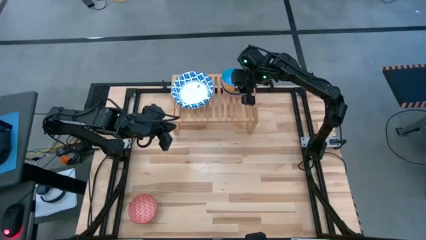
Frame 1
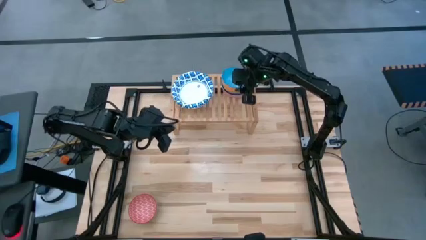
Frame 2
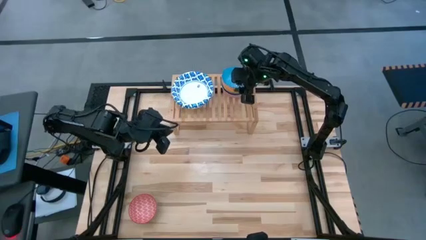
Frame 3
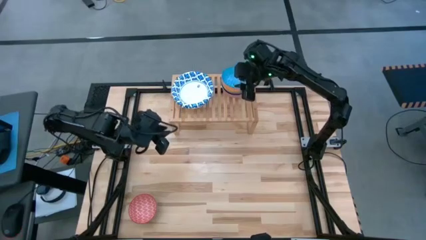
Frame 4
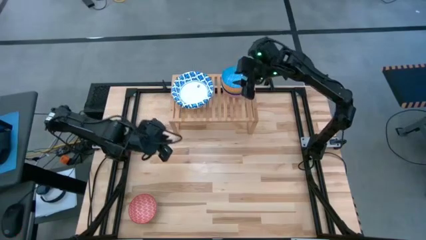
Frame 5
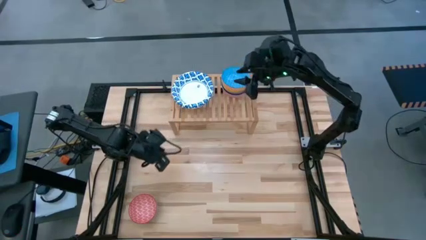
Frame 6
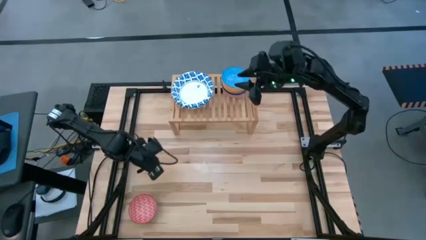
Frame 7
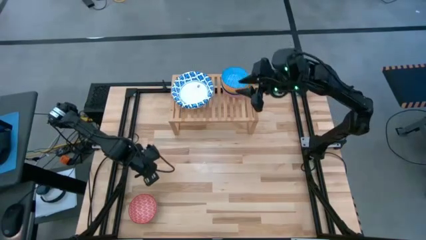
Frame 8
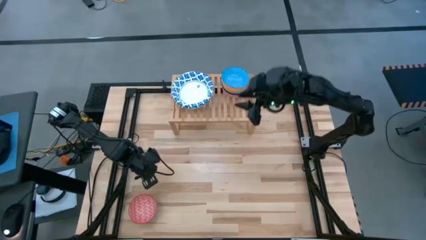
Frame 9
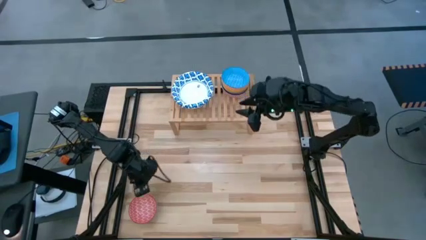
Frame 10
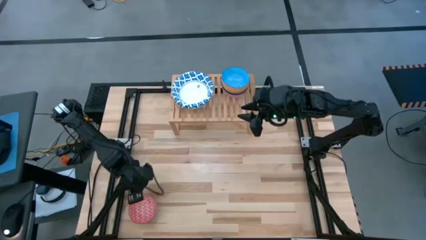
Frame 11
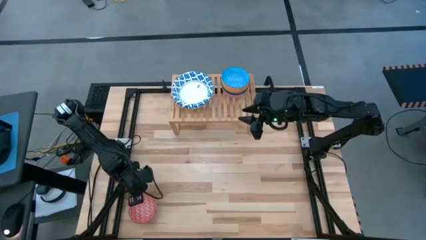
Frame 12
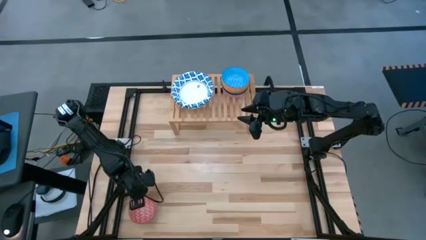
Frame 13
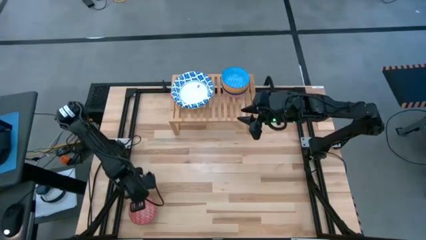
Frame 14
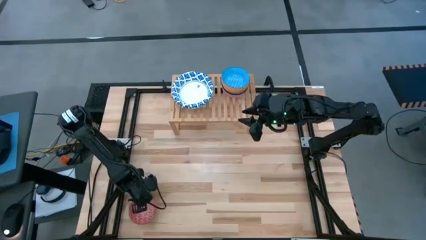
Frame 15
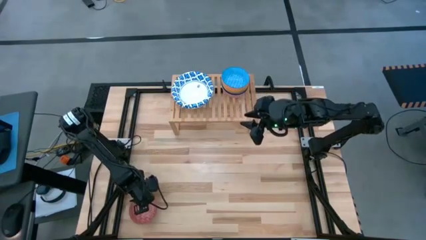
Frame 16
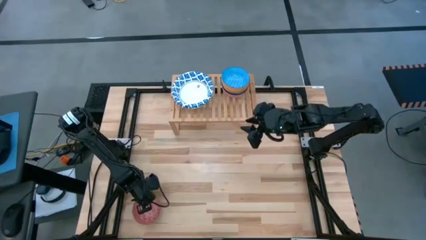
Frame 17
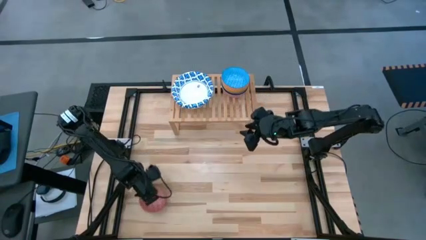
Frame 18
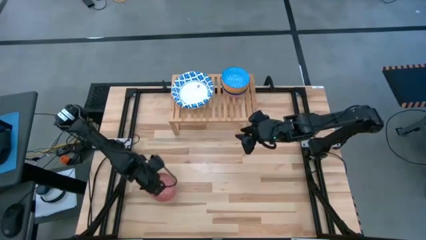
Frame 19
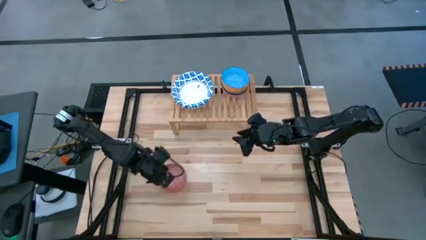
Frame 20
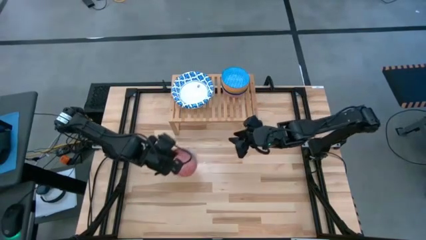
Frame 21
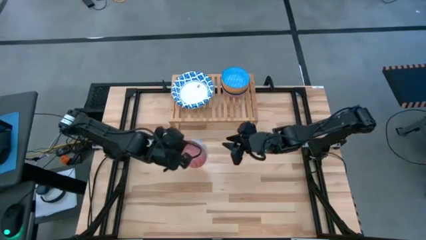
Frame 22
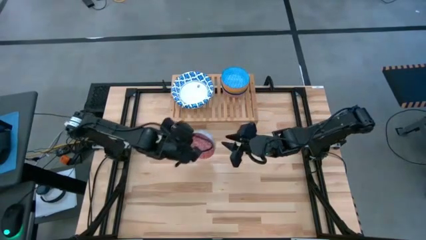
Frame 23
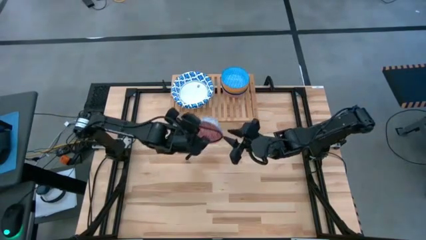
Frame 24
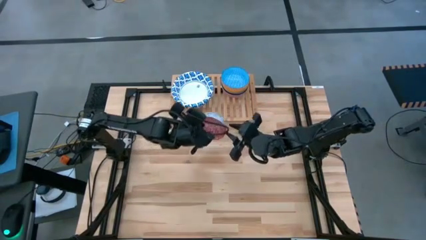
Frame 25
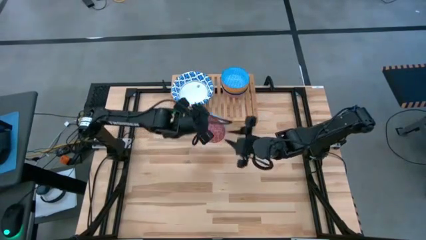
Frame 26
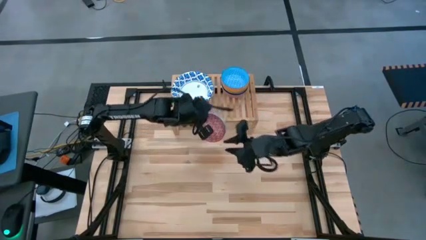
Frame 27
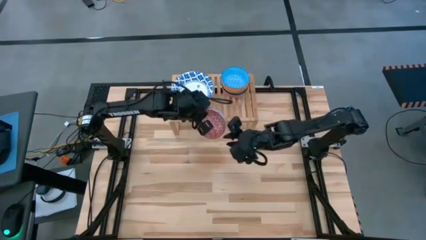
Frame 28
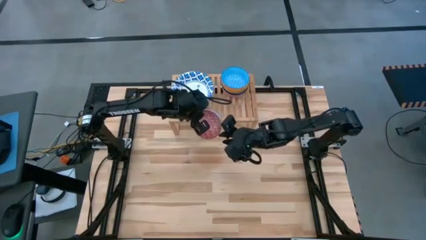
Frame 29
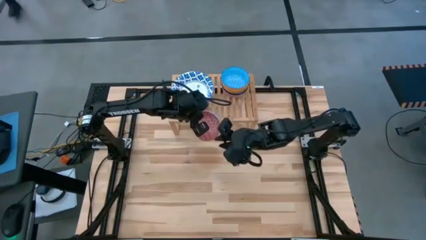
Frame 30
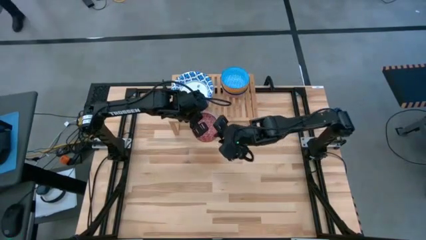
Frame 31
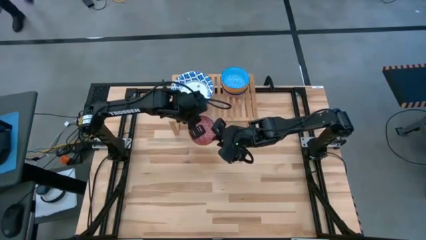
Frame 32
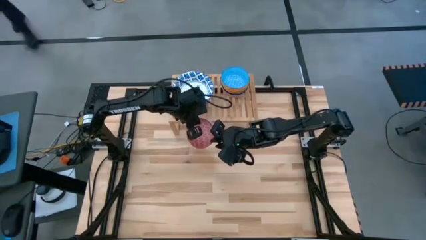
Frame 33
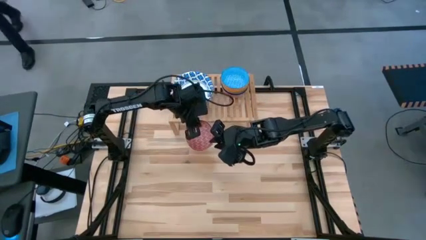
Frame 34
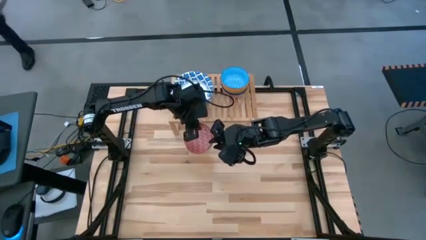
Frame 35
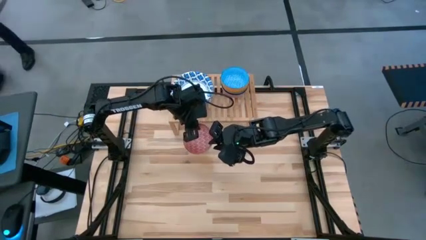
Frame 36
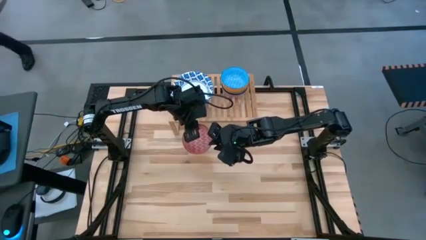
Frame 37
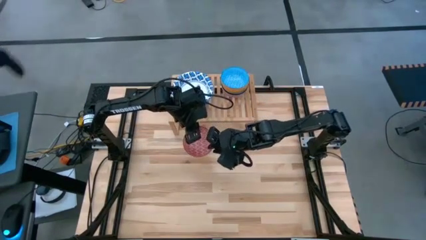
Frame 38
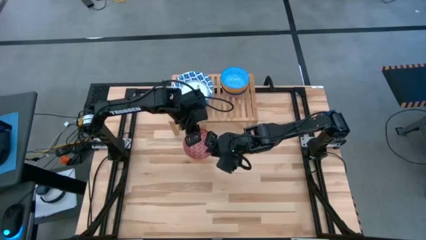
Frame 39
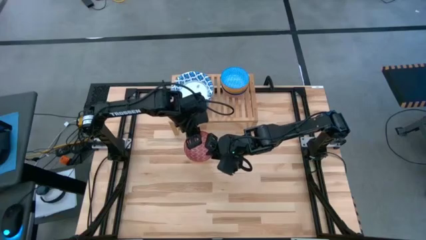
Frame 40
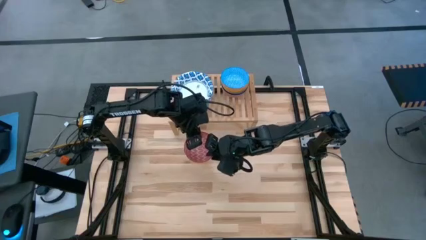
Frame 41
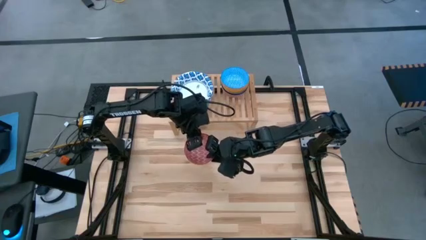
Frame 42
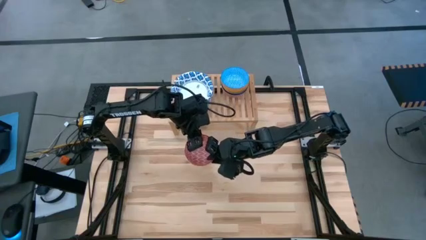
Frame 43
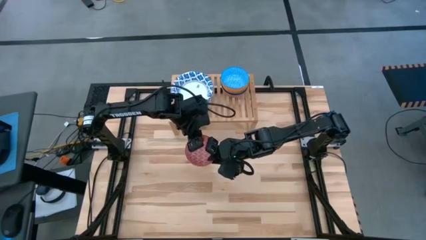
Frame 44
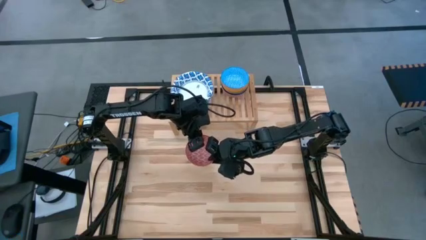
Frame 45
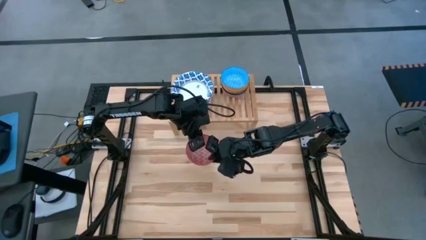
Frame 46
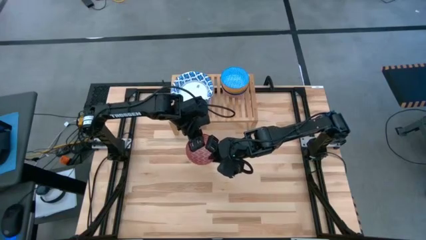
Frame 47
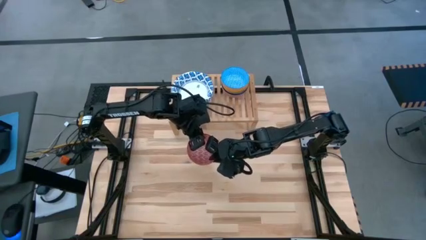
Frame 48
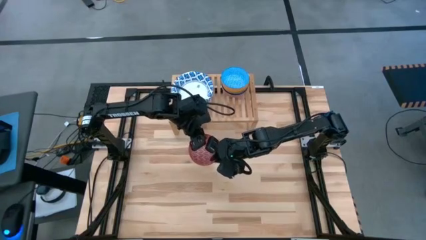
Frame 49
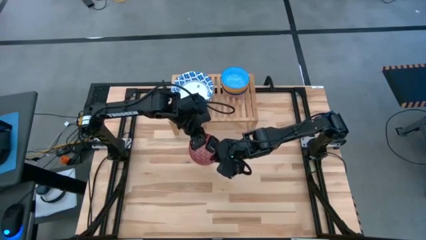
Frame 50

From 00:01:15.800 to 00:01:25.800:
Task: Place and stack bowls onto a shelf
Stack the gray red patterned bowl on top of the orange blue patterned bowl on the shelf

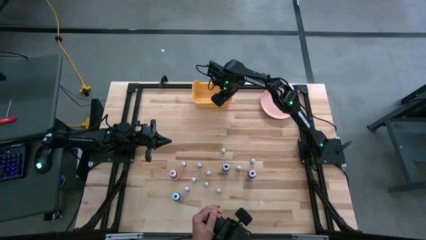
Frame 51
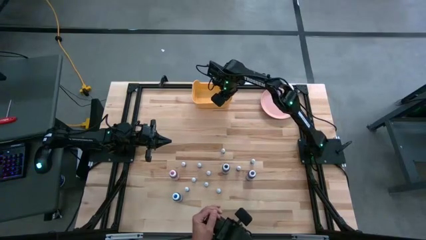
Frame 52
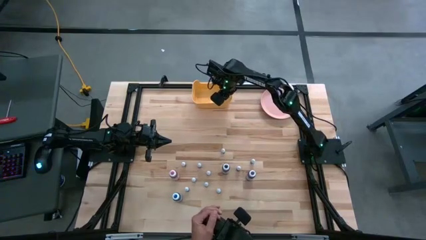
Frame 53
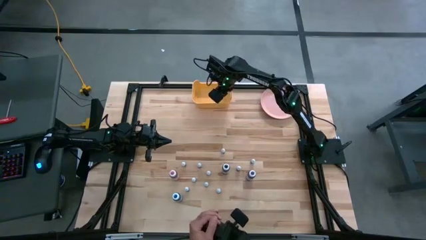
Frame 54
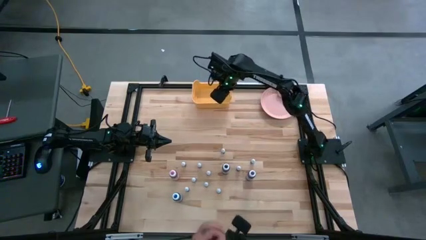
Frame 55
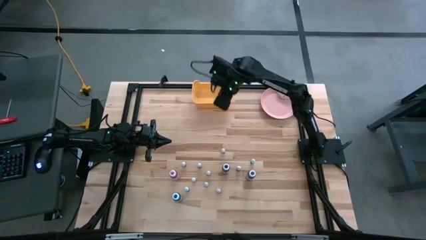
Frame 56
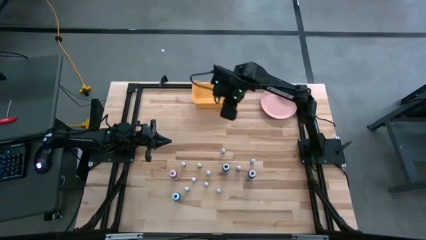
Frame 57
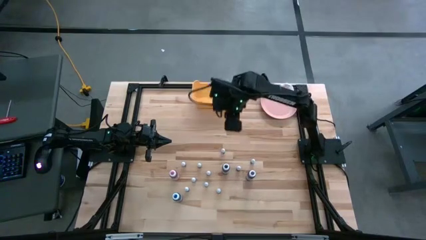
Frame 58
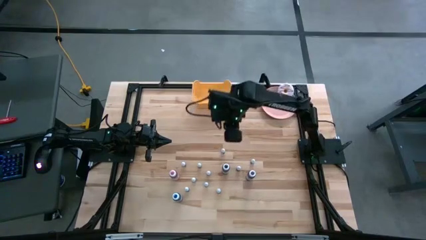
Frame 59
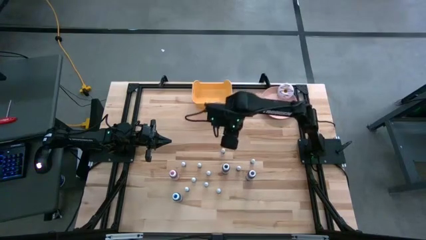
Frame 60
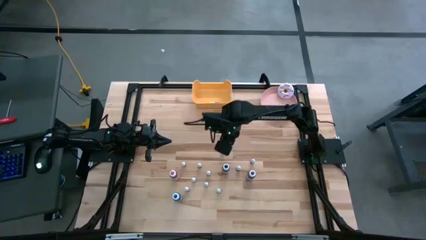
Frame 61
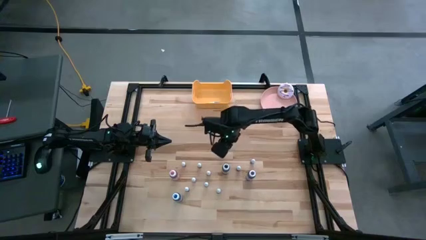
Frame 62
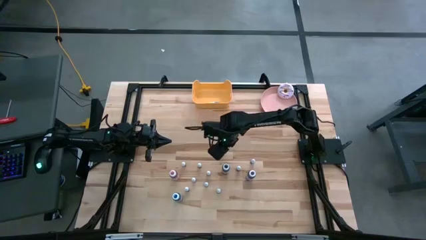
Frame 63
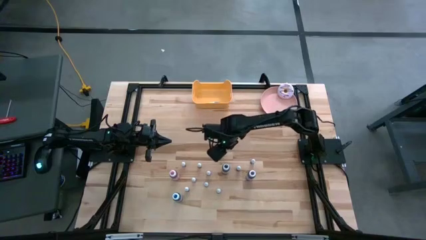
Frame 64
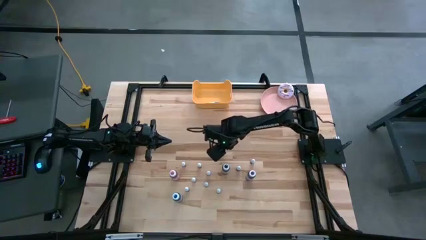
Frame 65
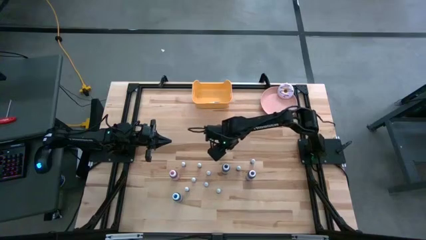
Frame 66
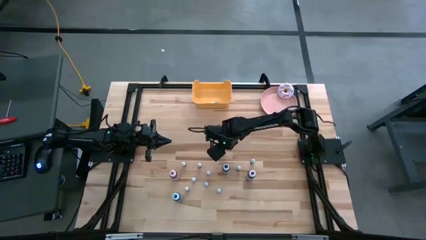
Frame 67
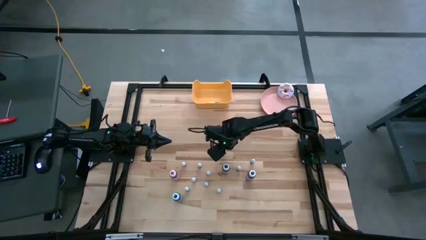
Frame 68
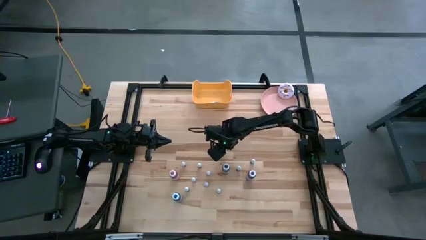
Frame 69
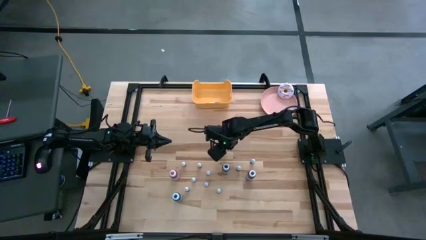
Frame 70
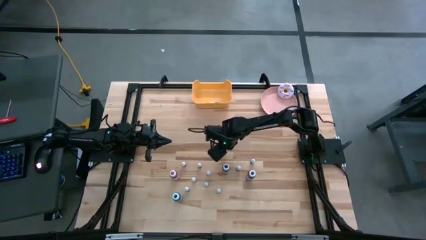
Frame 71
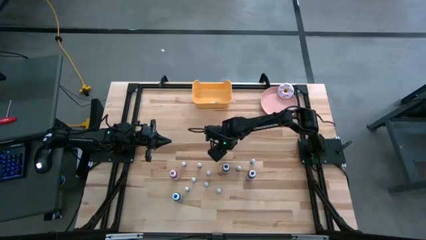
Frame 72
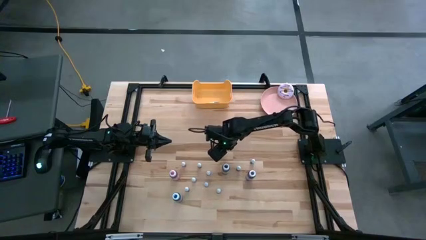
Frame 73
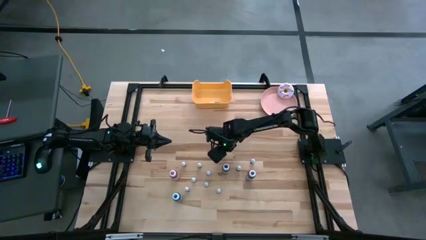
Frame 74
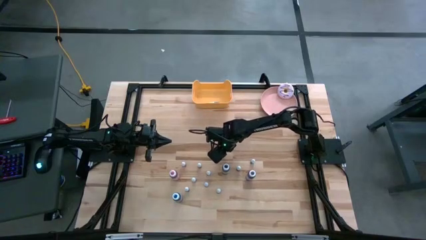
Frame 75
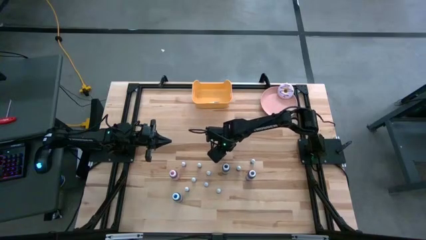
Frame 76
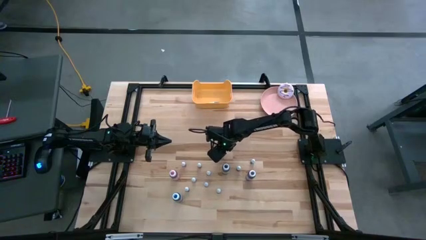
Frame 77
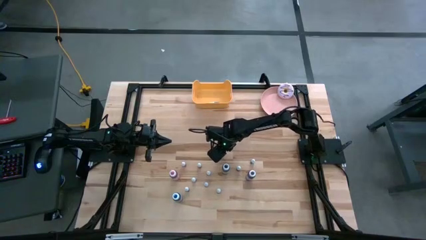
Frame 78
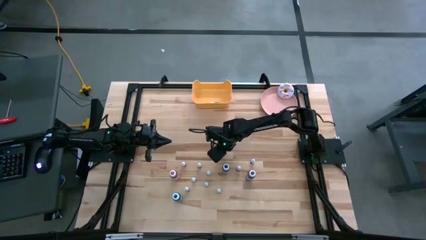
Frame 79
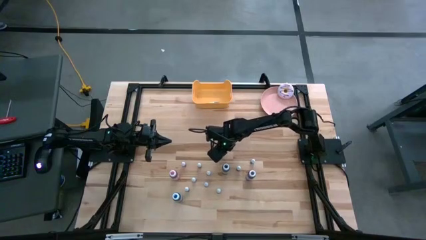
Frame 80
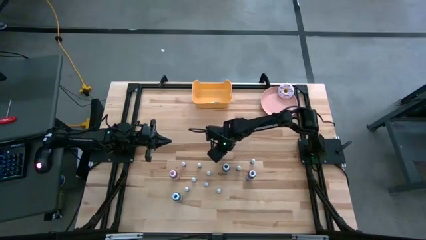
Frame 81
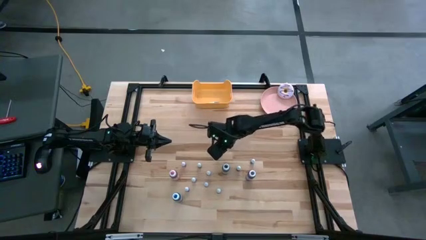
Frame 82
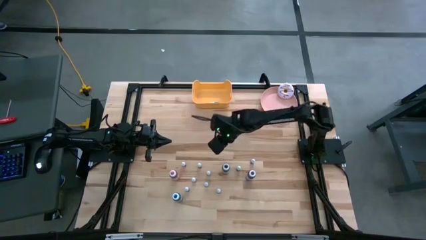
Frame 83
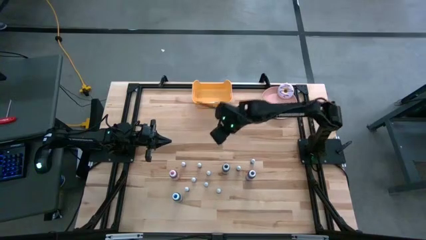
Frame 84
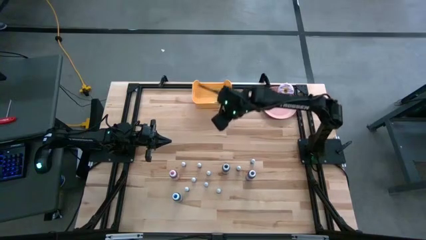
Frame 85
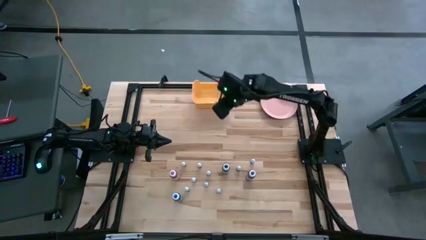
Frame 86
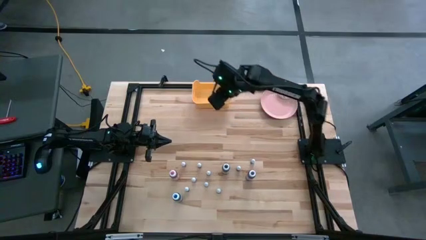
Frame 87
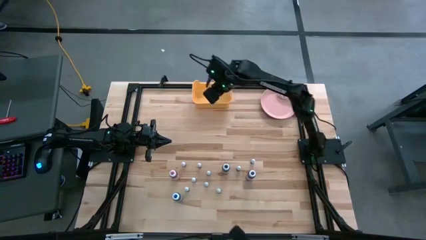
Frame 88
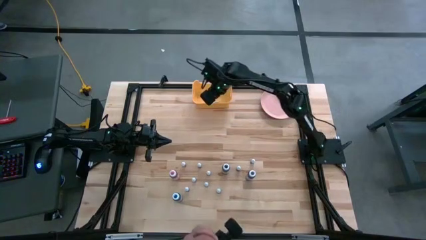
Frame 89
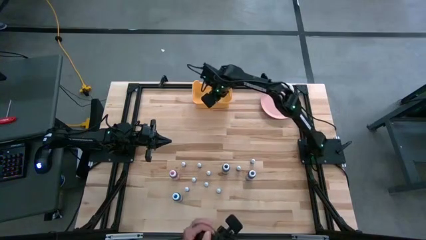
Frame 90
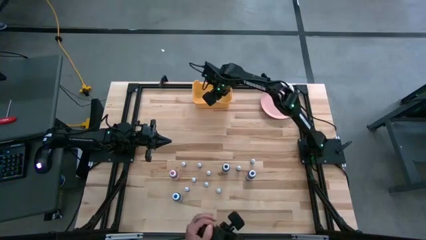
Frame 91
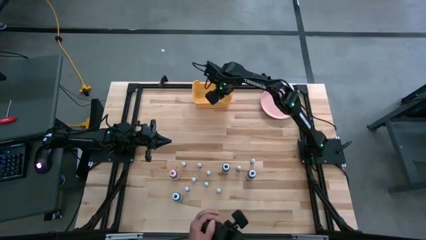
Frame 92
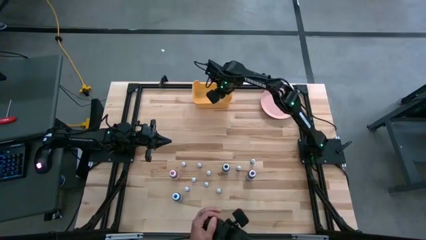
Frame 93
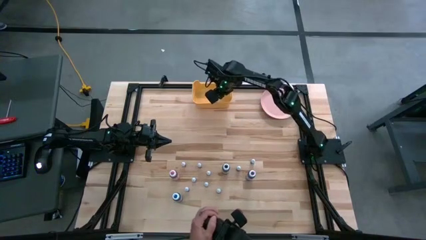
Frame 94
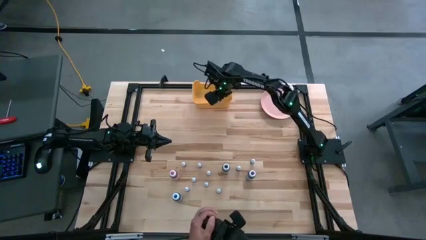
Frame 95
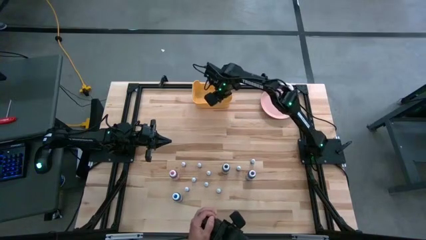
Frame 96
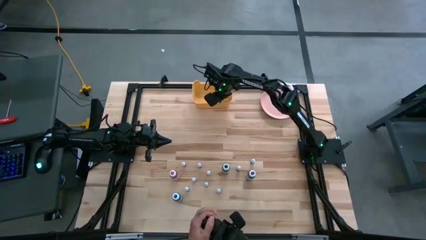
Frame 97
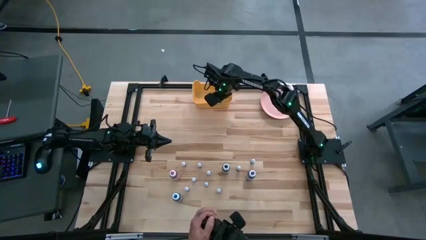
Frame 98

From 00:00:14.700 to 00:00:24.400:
Task: Pick & Place food coloring
Put the small brown food coloring bottle into the yellow bin
